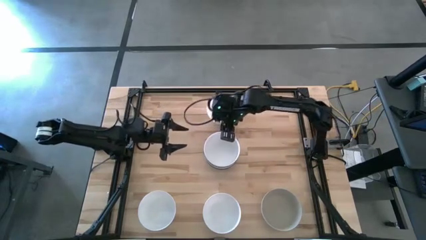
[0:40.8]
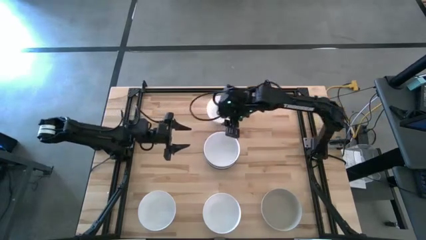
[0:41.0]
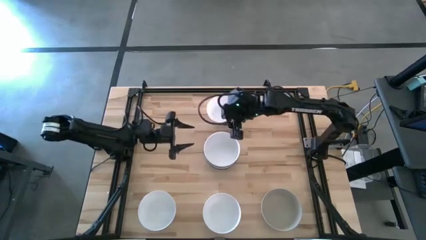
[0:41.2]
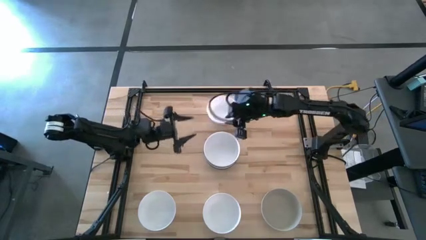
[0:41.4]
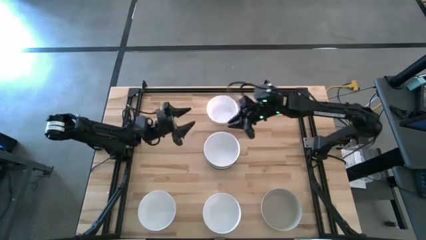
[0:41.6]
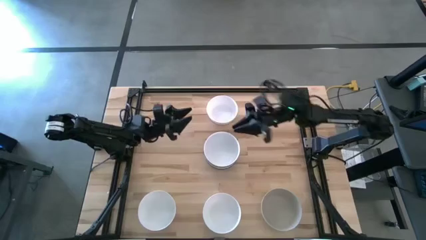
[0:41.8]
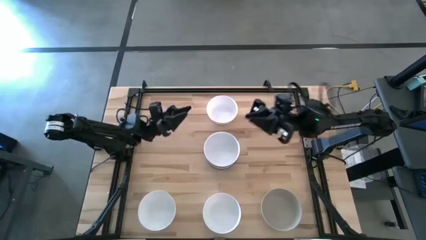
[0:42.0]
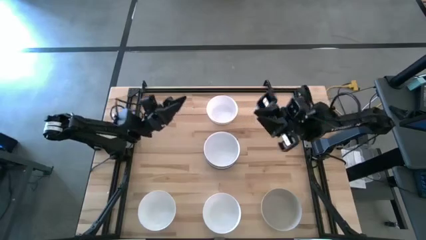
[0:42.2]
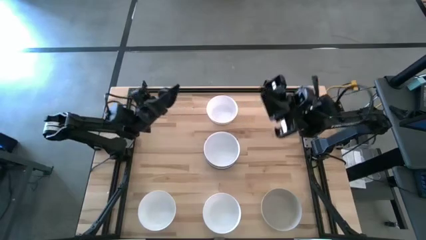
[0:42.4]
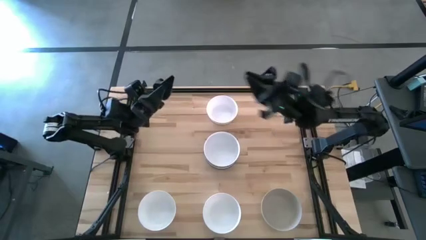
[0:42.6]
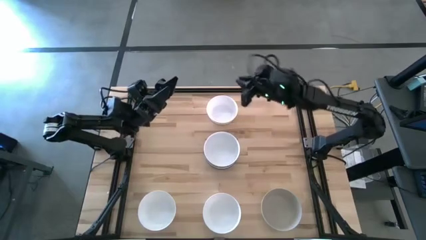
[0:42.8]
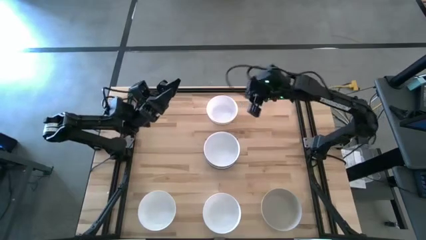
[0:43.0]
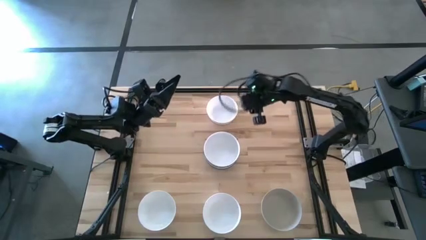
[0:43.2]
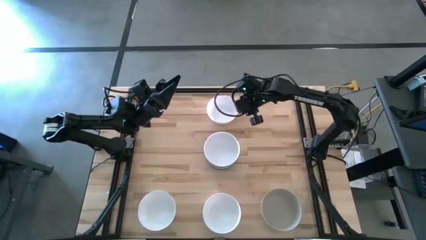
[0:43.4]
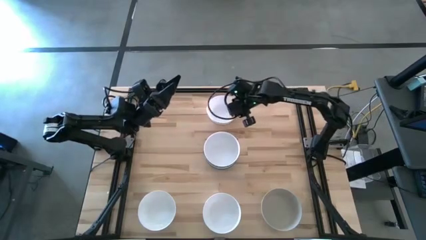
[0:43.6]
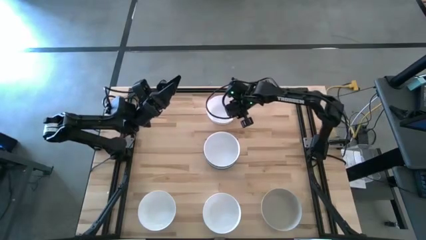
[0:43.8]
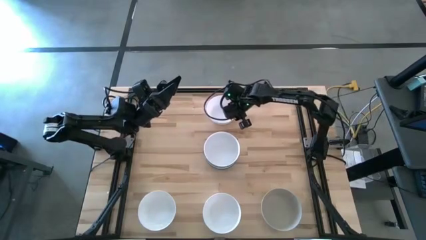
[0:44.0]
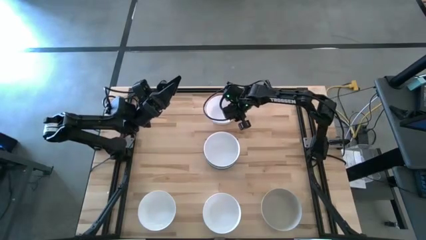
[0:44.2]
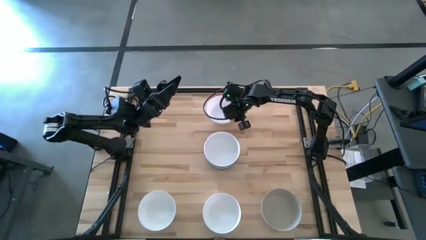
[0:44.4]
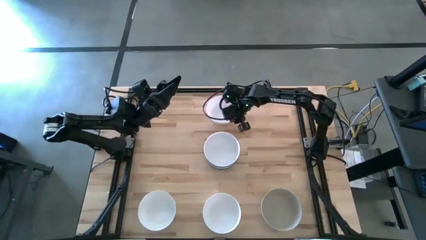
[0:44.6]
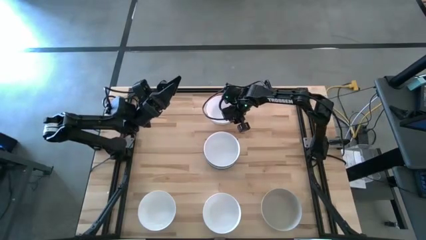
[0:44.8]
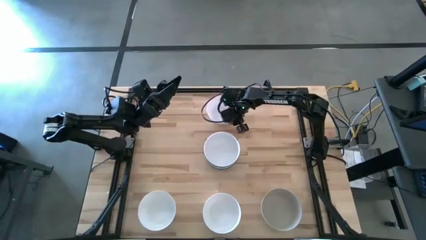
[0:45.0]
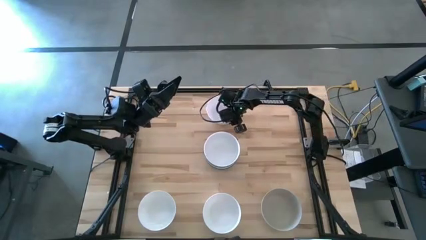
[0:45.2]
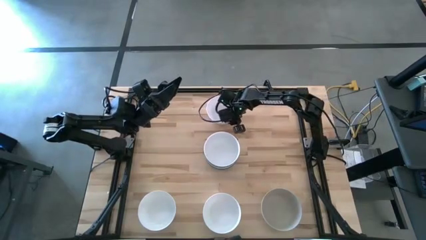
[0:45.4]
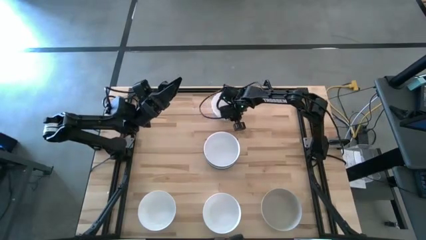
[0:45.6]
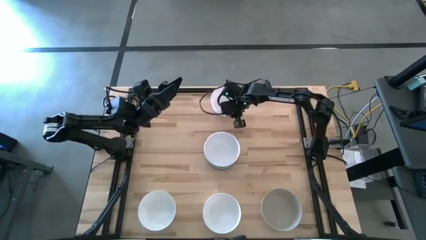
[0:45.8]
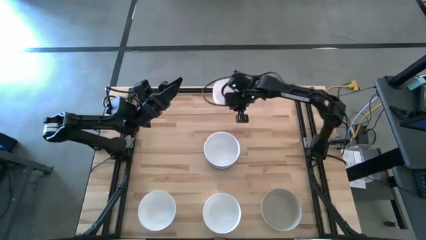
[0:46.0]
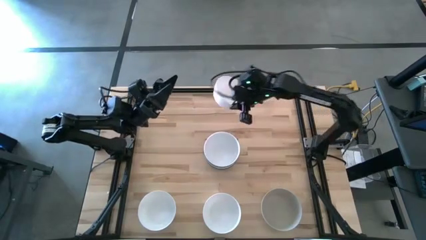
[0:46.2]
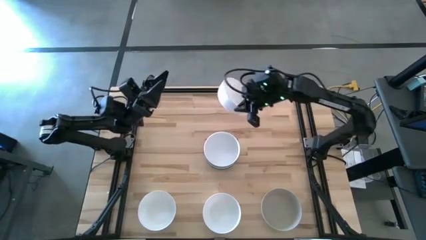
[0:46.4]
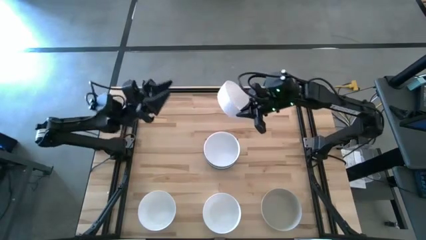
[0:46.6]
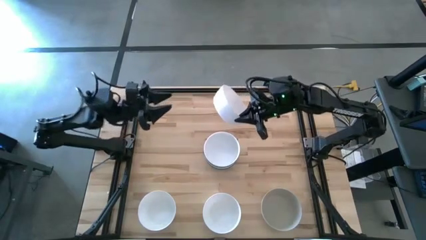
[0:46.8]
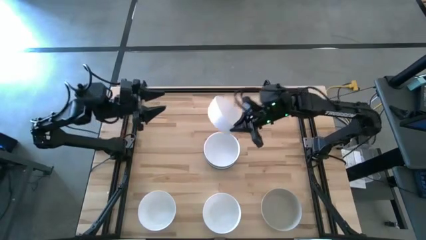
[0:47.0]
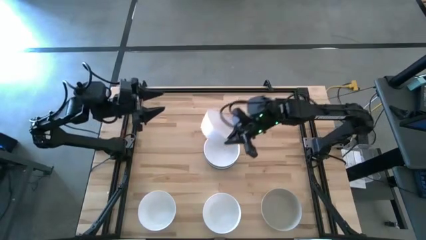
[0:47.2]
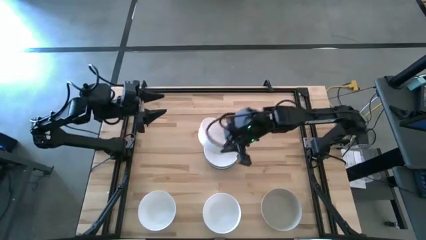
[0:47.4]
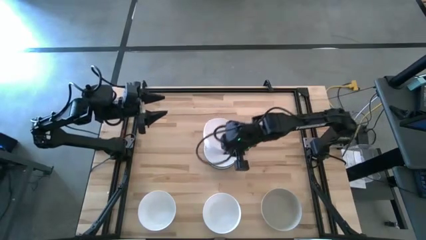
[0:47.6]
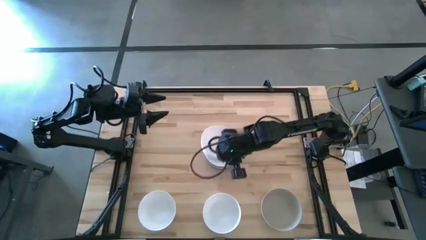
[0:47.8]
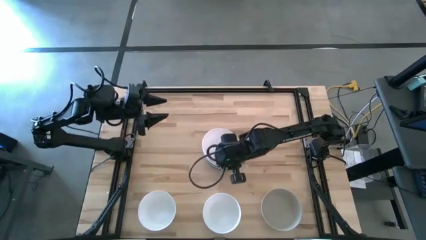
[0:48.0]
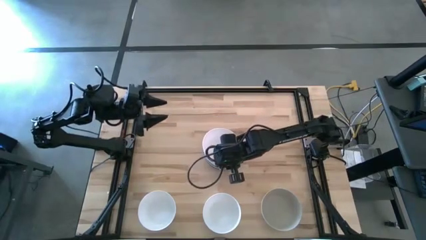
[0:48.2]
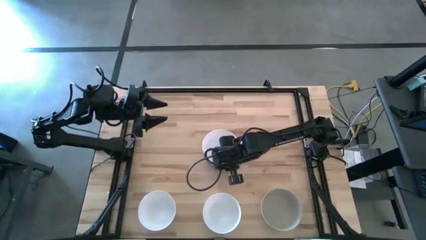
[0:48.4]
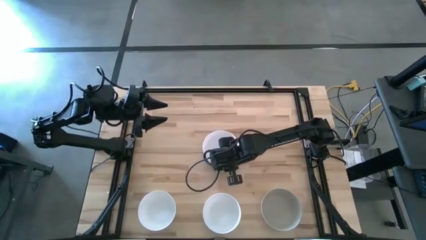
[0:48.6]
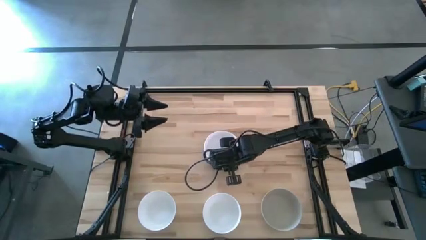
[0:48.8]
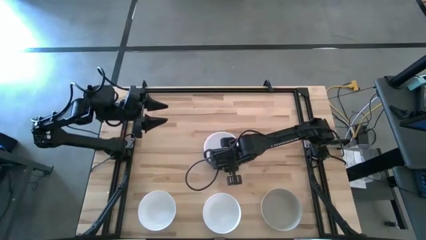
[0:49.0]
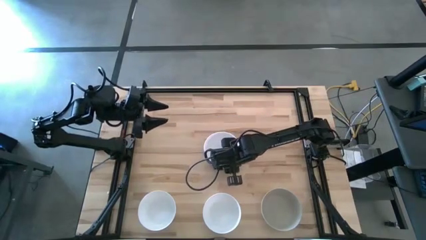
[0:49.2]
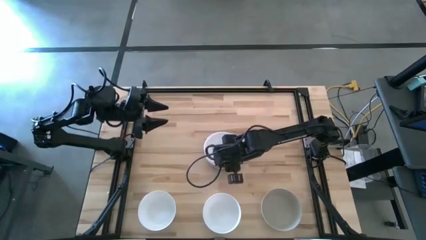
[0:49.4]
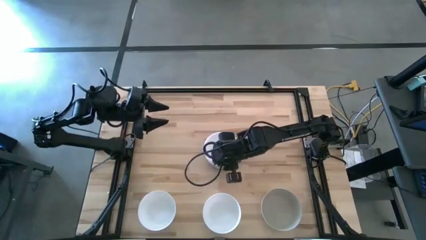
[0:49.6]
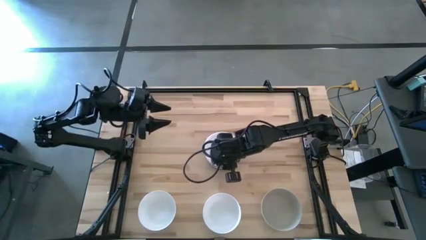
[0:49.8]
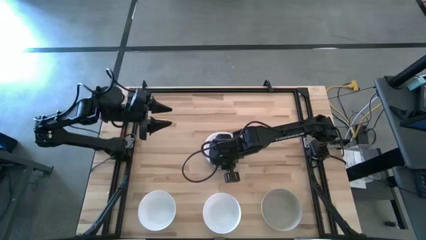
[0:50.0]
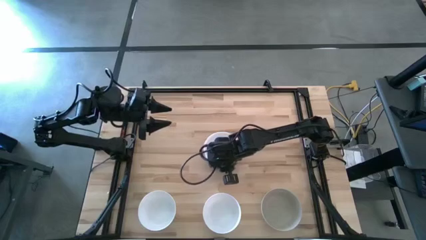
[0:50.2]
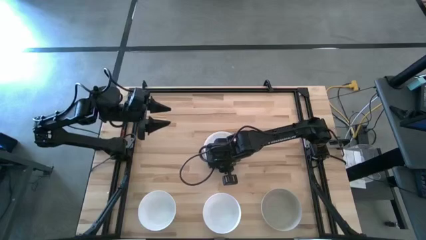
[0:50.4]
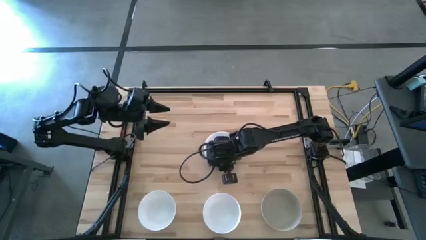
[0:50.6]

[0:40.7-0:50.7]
Task: Nest bowls inside each other
Stack the white bowl on top of the white bowl

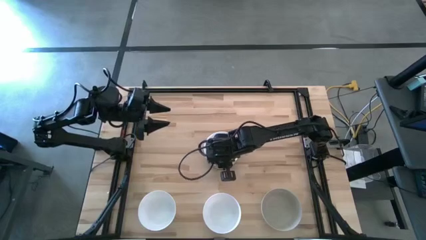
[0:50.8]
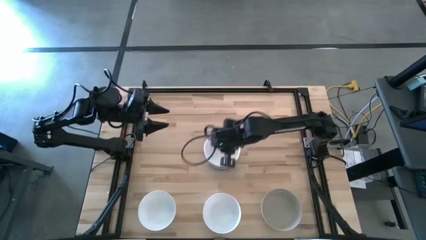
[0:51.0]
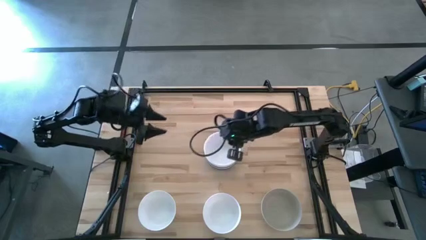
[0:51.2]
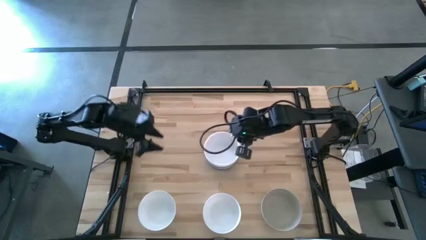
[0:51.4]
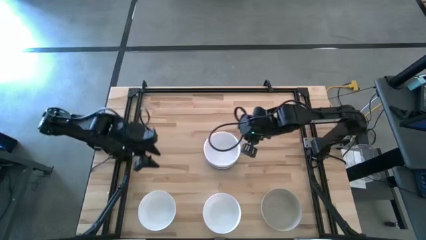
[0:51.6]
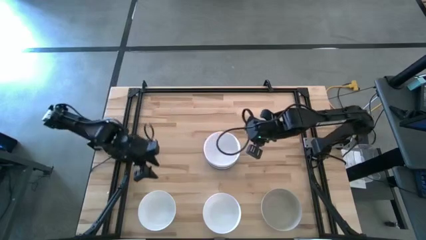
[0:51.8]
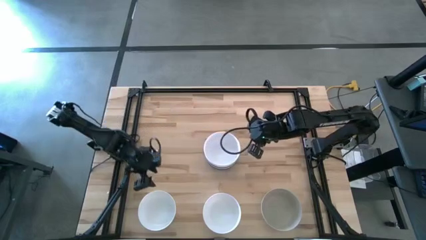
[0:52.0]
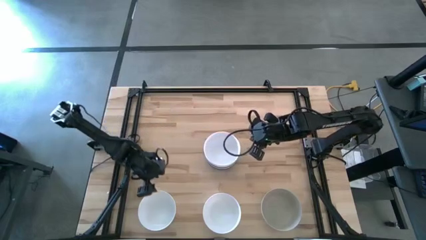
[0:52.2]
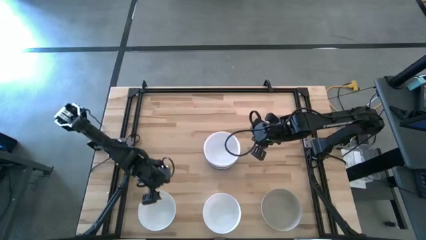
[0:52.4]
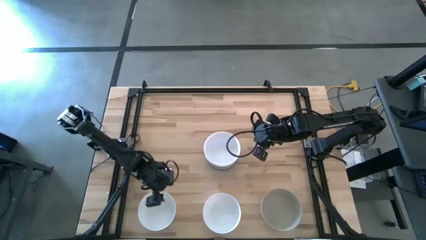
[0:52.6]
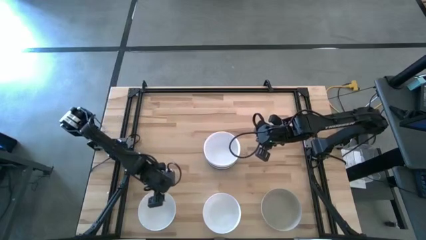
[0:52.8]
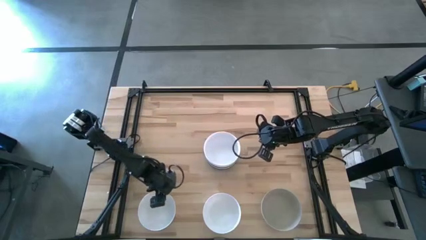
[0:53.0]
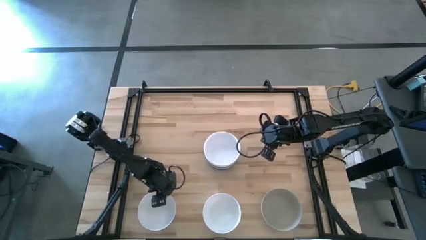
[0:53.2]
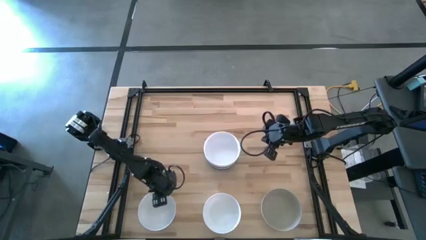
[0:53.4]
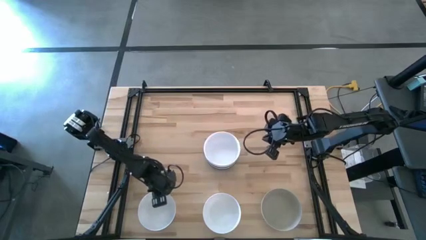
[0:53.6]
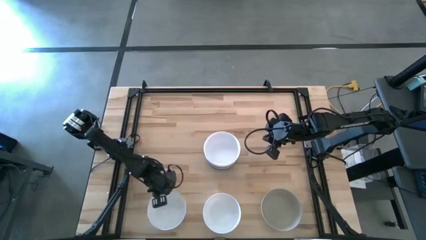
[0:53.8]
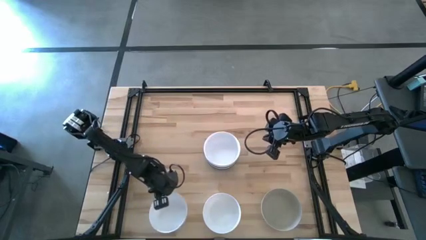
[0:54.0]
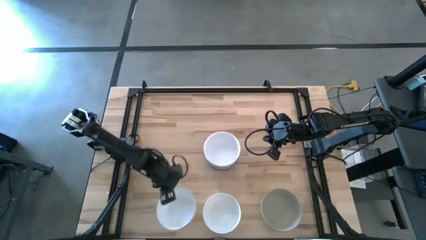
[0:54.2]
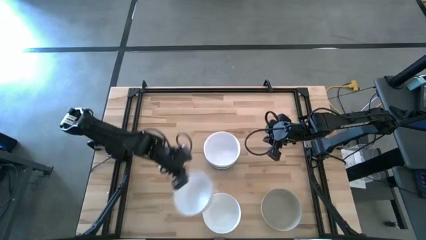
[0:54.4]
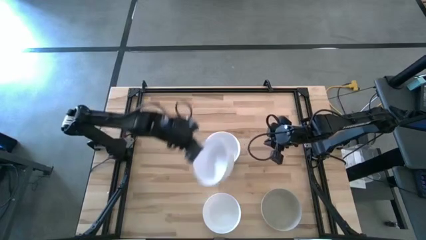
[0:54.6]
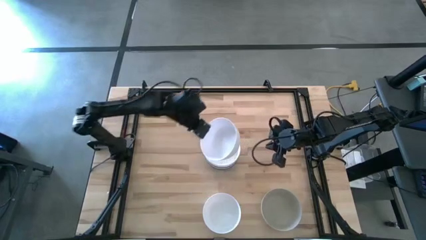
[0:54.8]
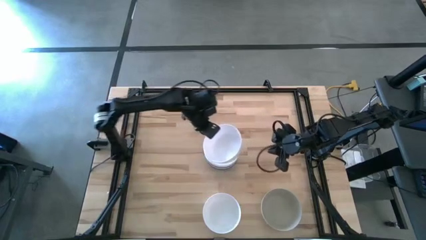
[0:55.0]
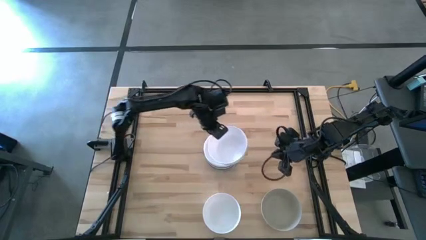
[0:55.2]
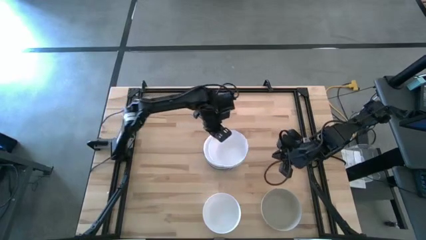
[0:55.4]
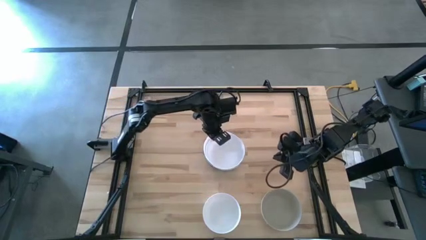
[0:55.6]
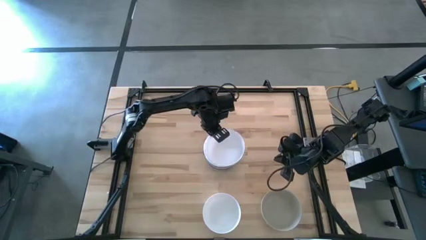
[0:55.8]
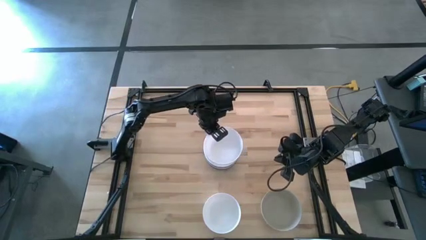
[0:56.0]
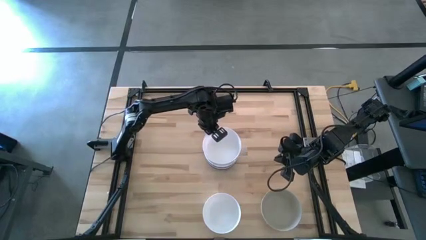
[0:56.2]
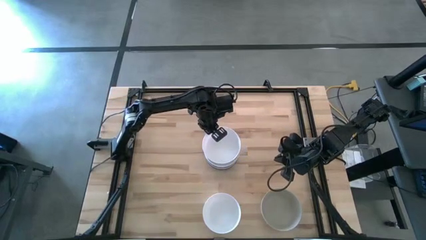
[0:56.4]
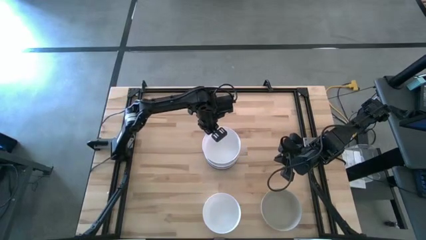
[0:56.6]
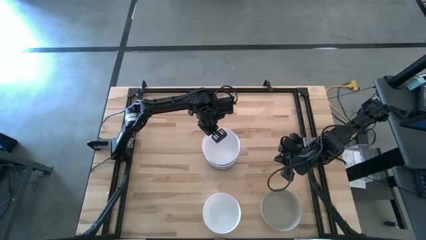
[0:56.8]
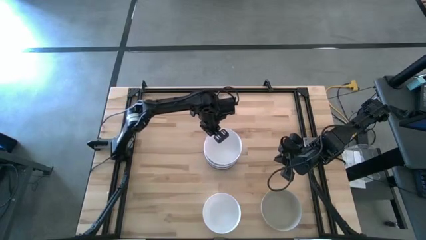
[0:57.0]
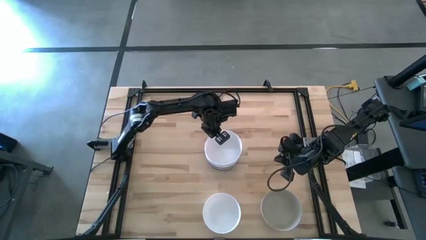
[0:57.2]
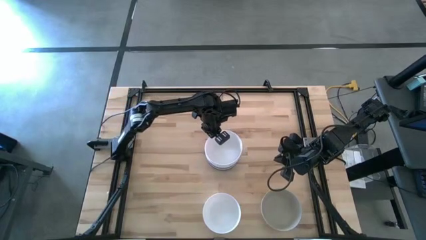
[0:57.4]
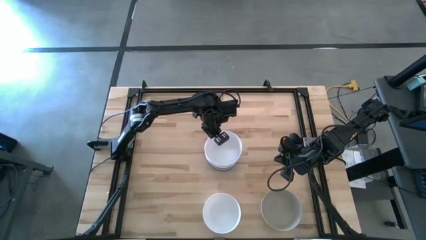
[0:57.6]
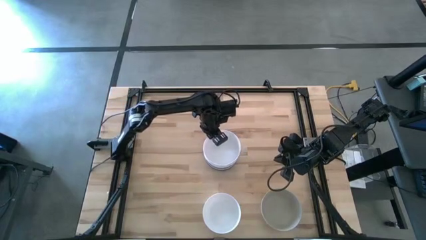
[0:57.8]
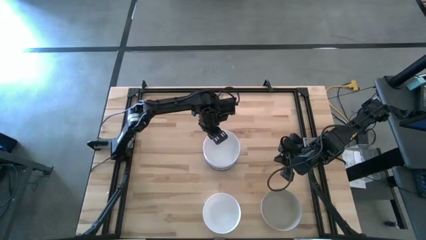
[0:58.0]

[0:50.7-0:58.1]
Stack the white bowl on top of the white bowl
